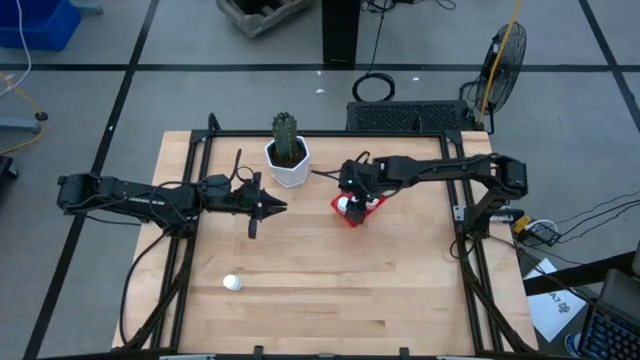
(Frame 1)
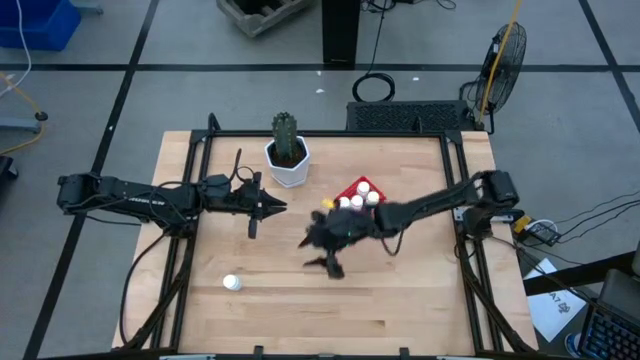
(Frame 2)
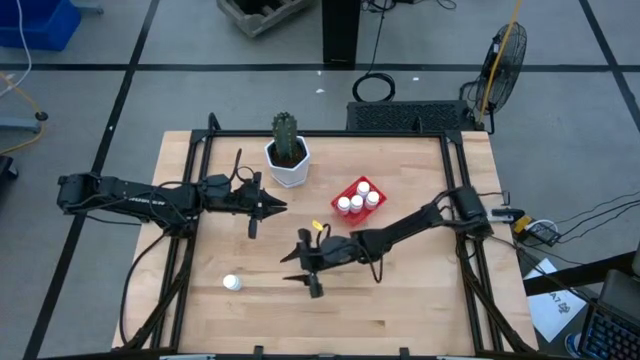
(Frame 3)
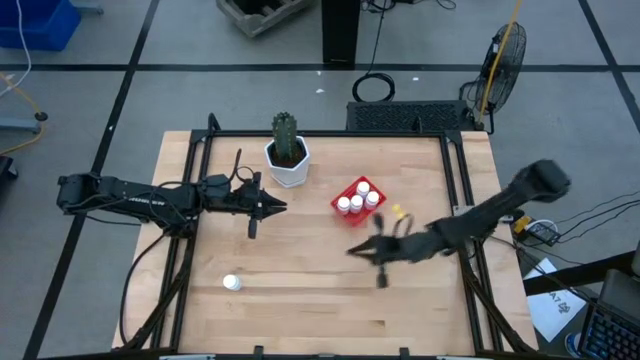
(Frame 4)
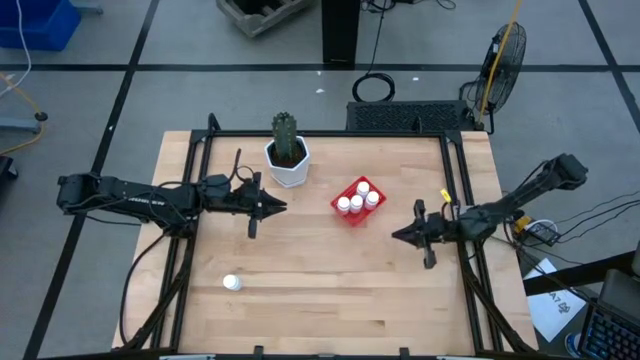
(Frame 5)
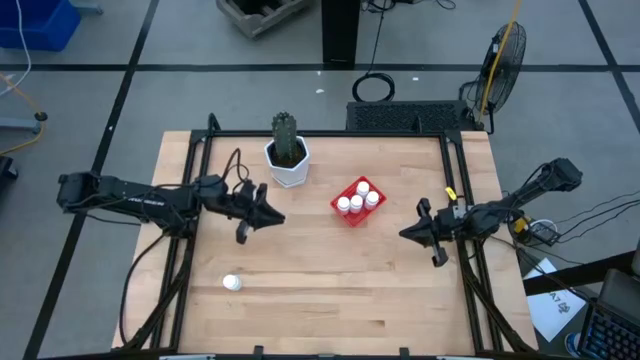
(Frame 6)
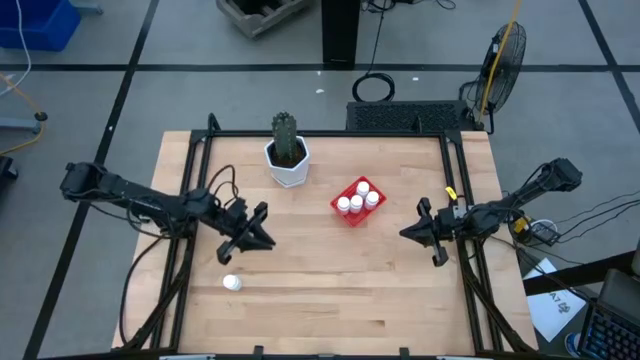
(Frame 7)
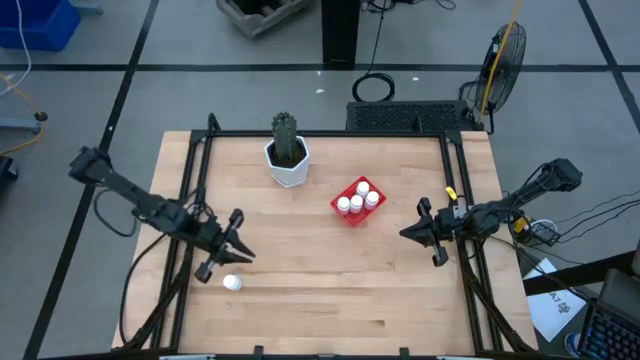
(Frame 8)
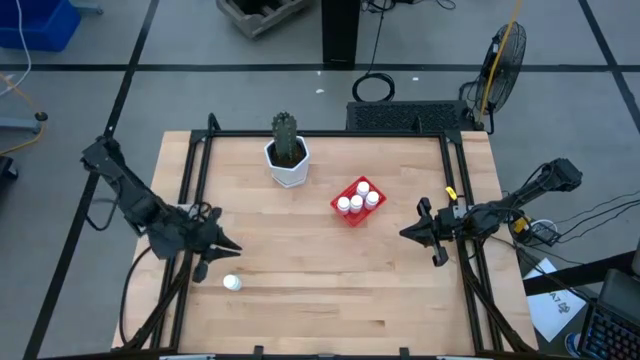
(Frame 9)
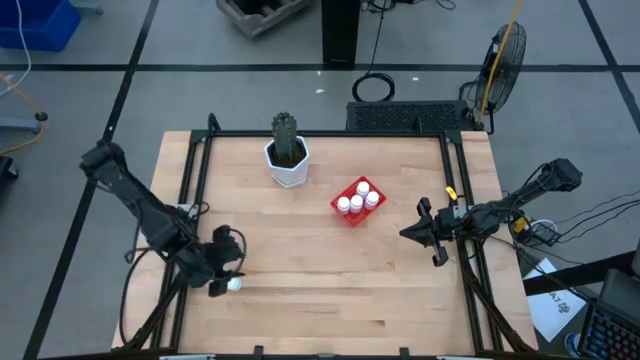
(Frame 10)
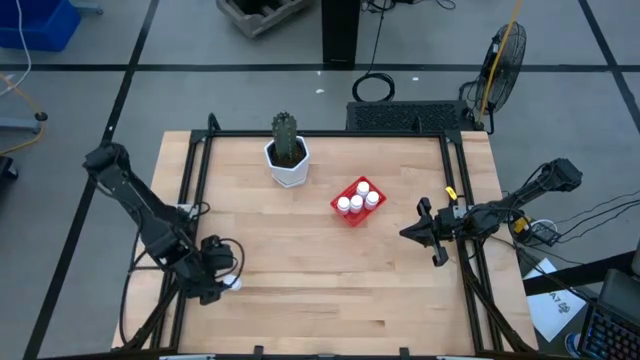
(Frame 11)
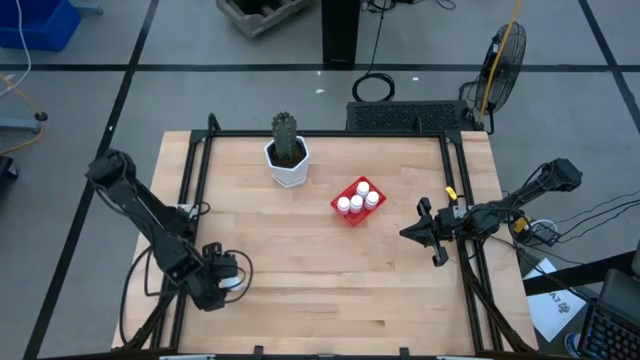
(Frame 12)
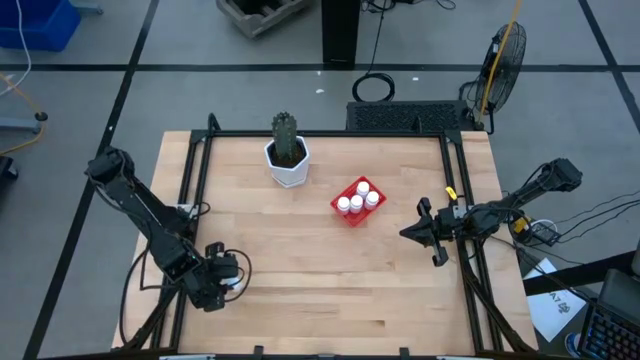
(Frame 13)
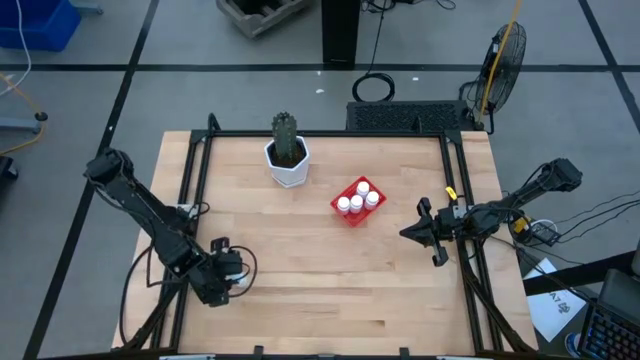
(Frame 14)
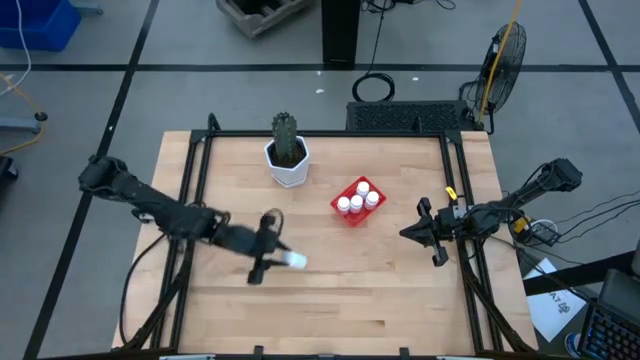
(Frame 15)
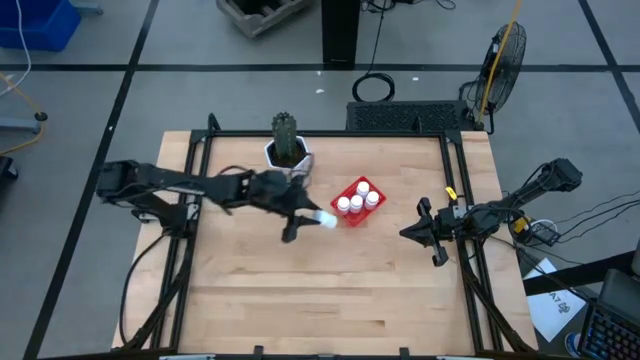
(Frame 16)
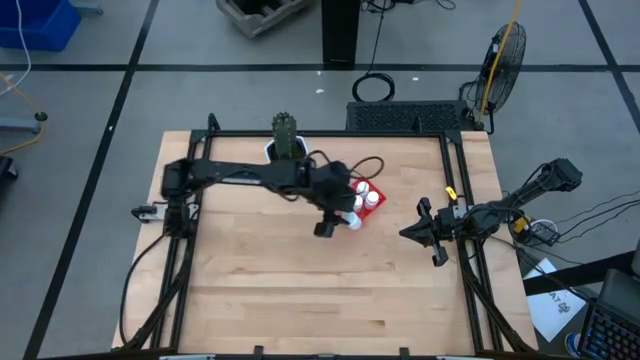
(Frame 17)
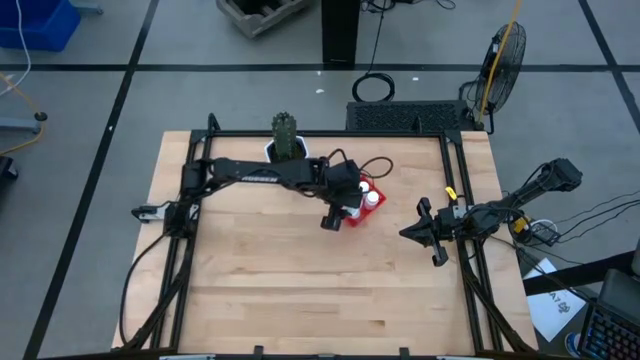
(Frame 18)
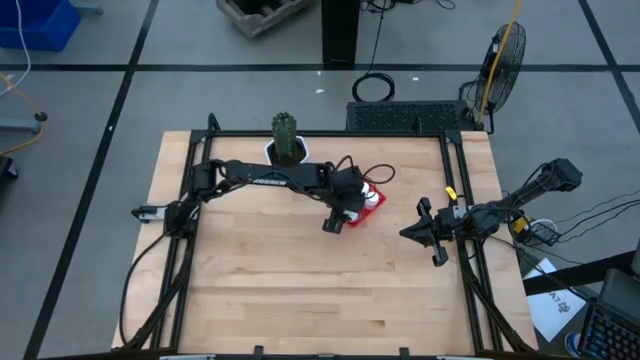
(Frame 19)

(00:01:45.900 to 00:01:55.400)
Task: Pick and place pill bottles into a basket
Put the white pill bottle into the red bin

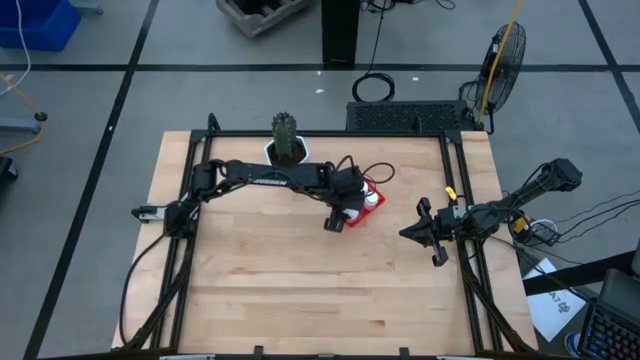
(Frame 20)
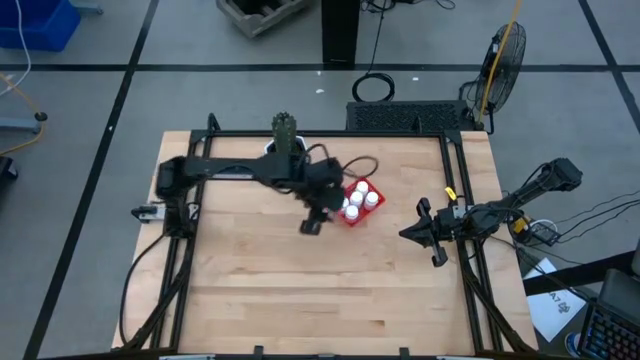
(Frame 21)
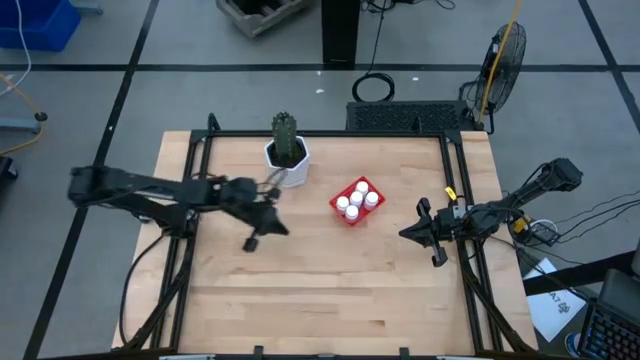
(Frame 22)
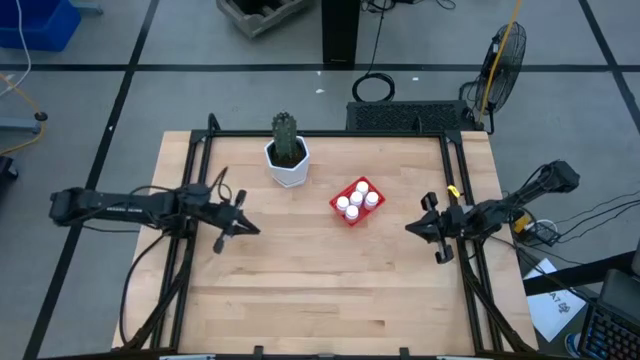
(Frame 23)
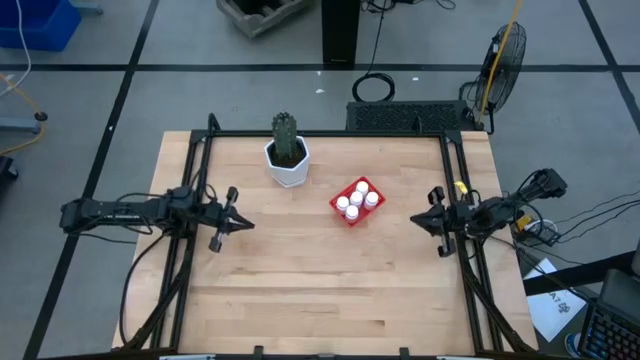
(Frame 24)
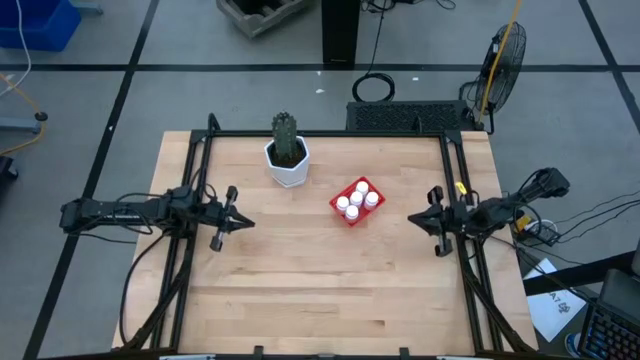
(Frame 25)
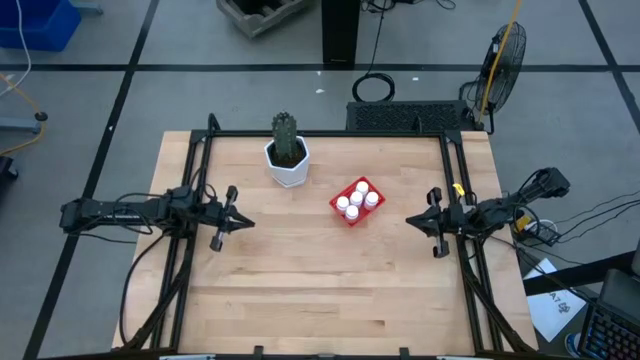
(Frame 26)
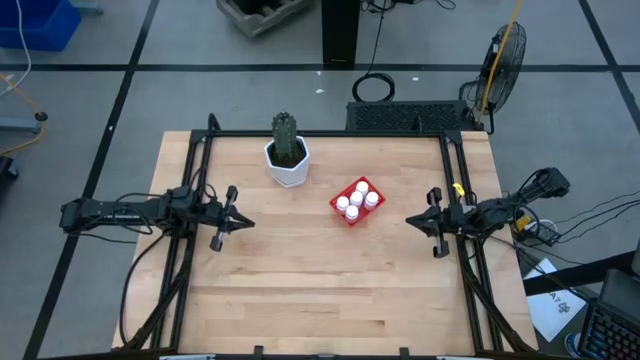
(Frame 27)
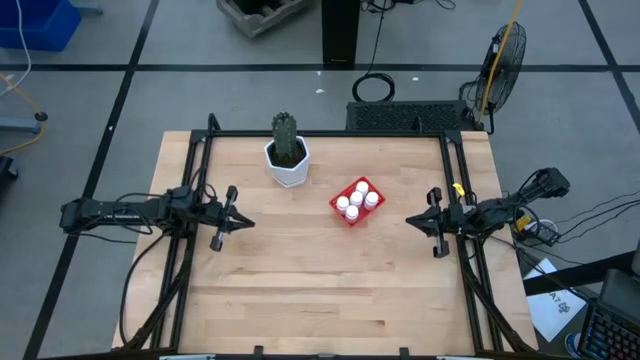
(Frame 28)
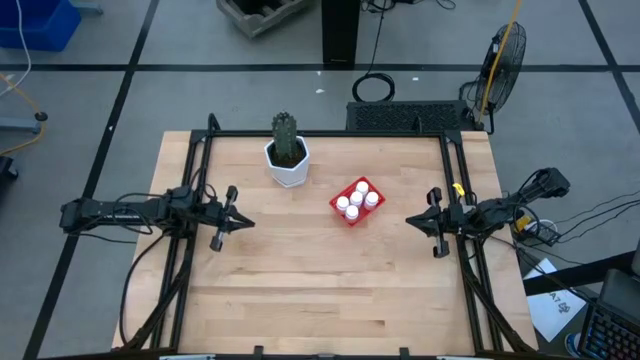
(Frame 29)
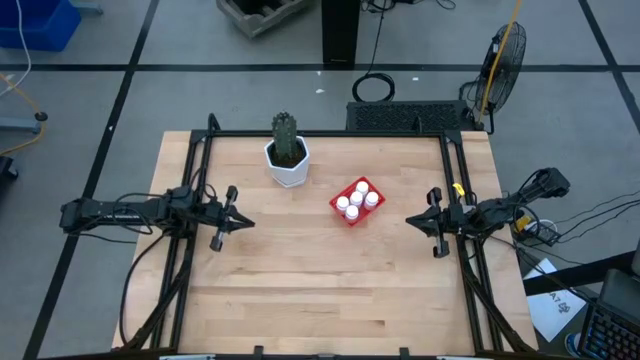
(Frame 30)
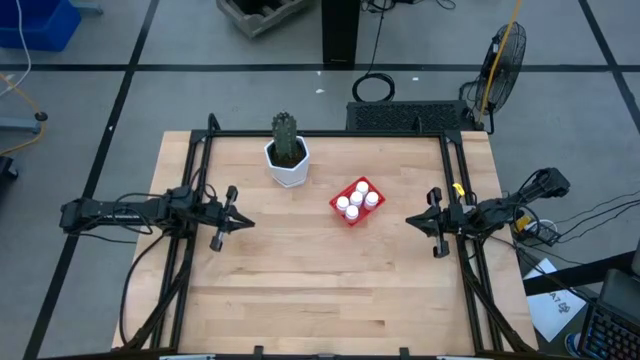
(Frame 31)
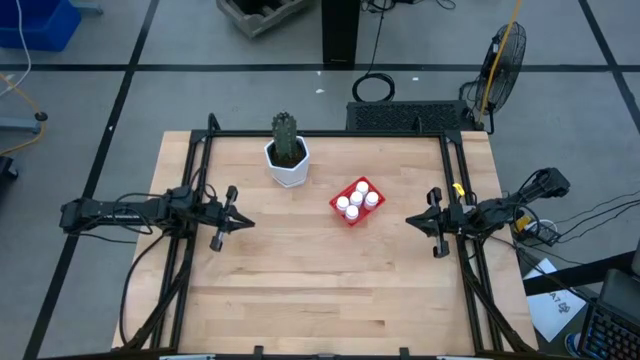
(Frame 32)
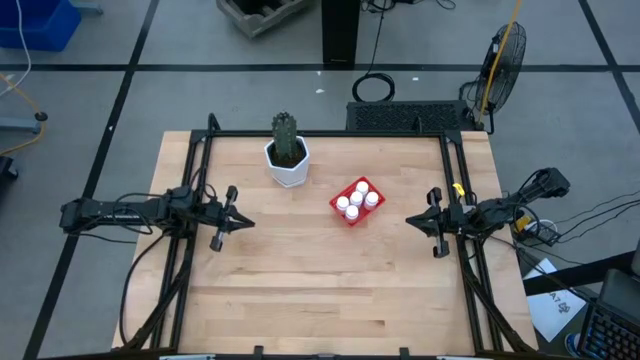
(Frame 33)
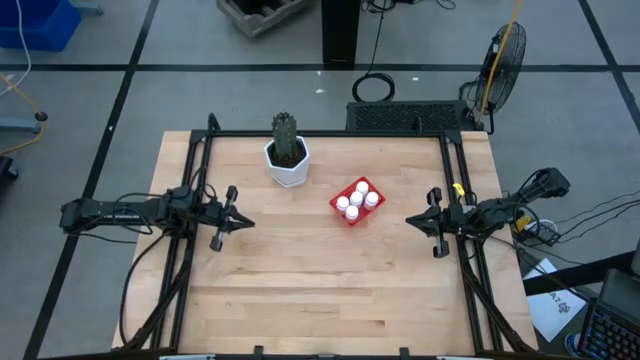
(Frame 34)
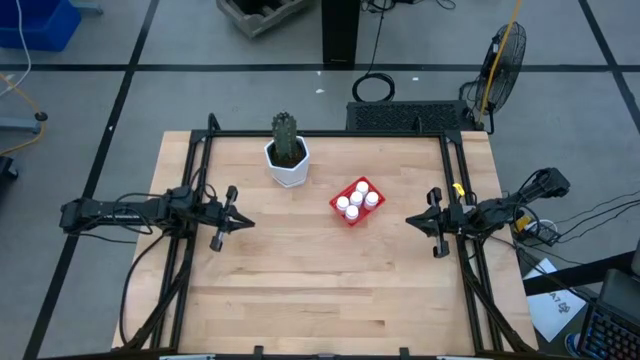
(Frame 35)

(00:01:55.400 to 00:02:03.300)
Return to Home Position

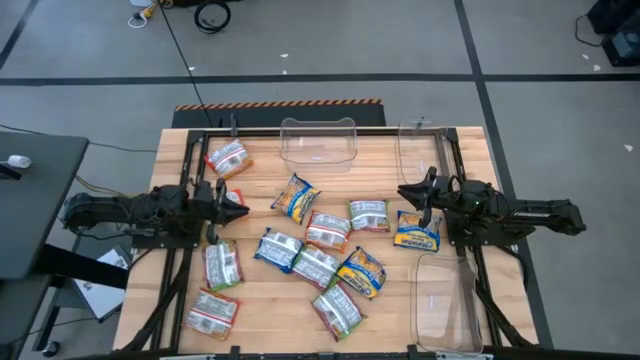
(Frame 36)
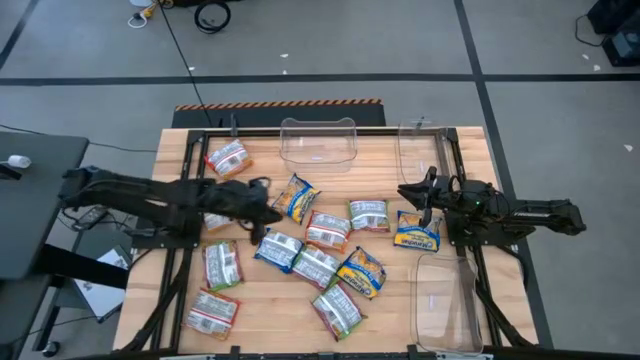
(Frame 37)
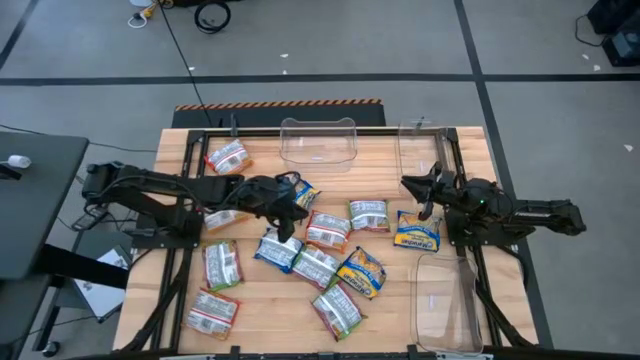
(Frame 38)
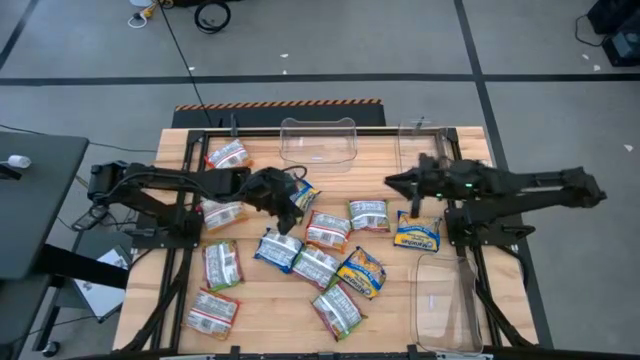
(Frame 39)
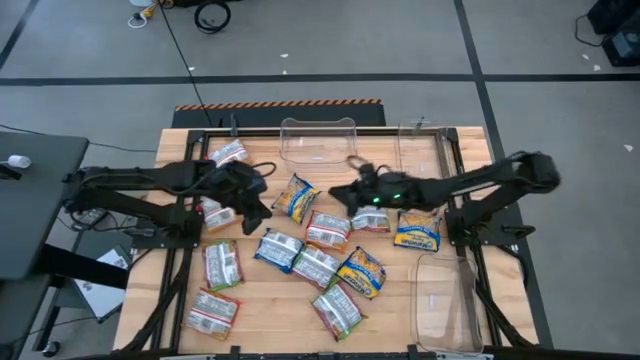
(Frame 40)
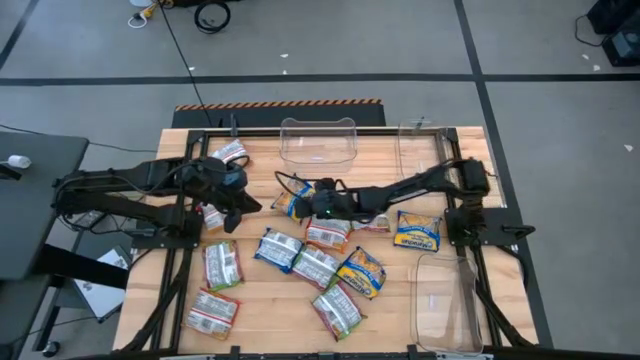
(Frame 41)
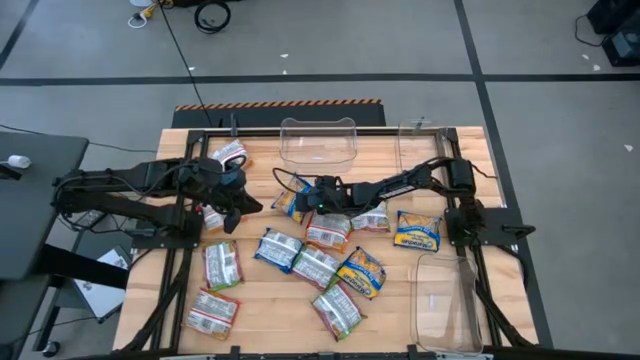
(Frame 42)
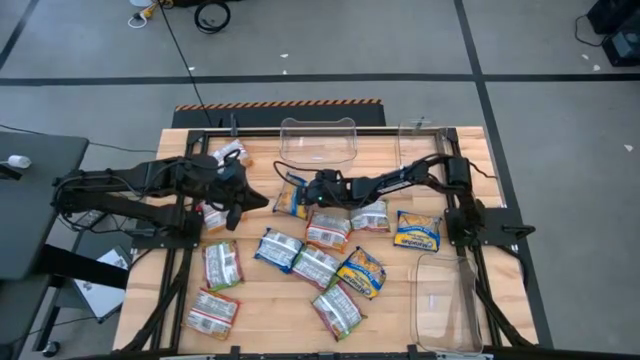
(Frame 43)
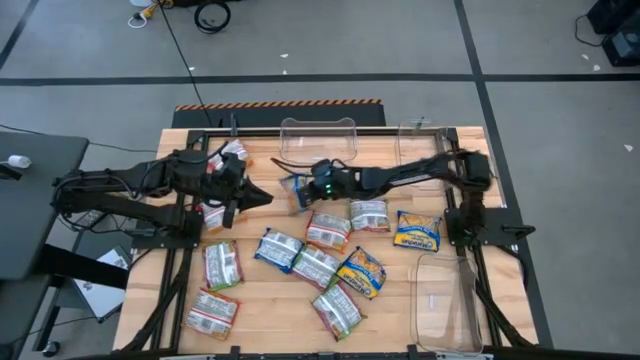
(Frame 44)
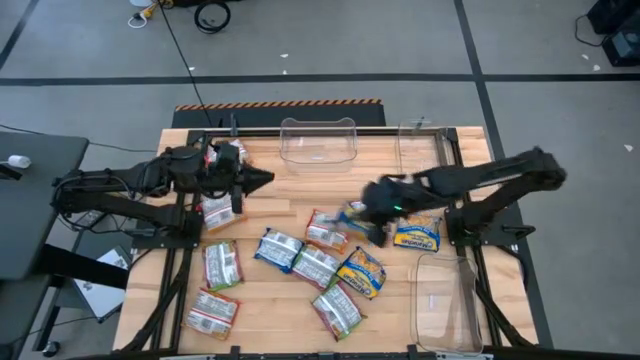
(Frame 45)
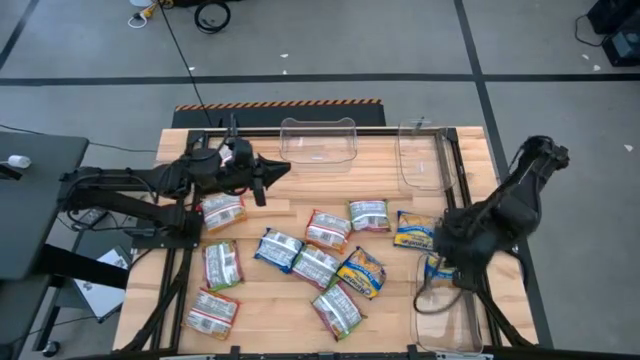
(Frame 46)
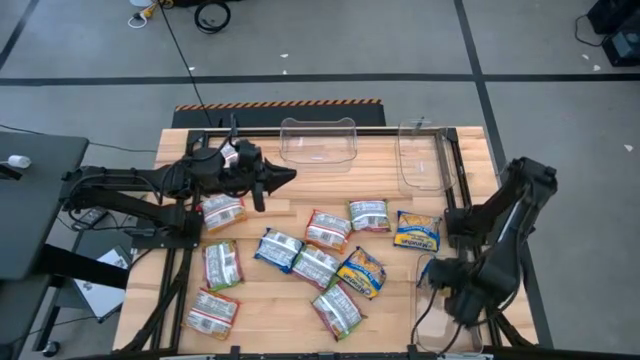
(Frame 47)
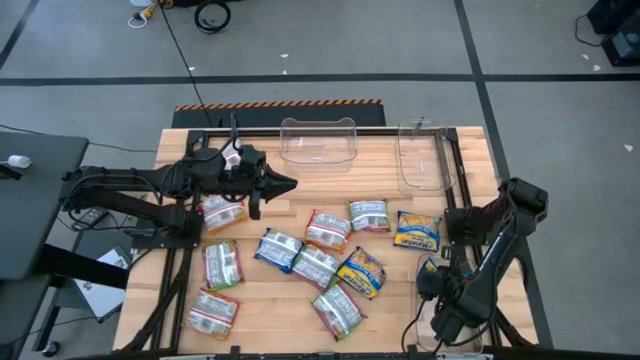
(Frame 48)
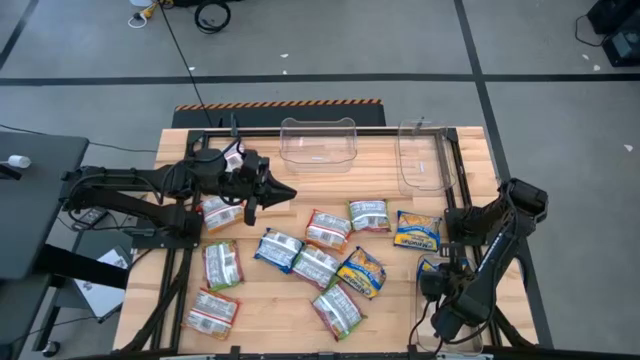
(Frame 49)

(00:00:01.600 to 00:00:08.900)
Task: Sort Maruchan noodles
Put the top left blue noodle pack into the bottom right transparent bin
